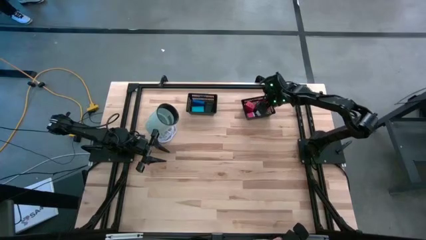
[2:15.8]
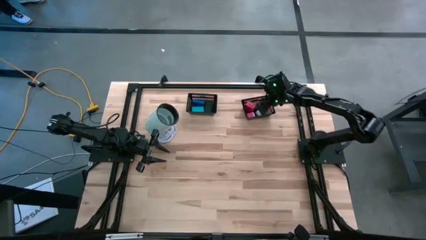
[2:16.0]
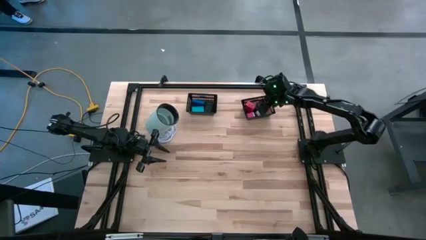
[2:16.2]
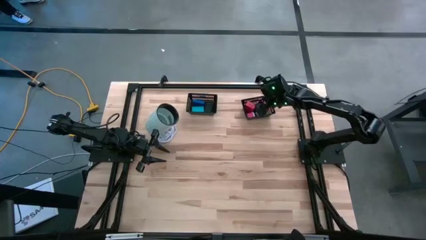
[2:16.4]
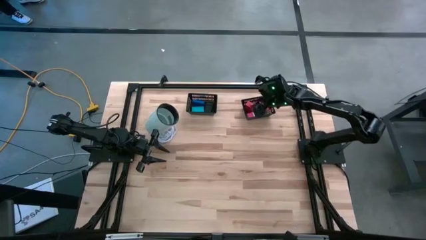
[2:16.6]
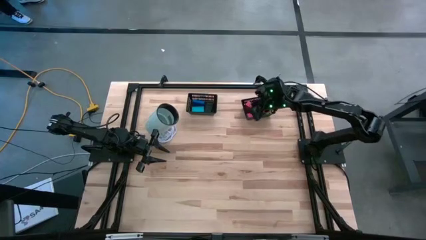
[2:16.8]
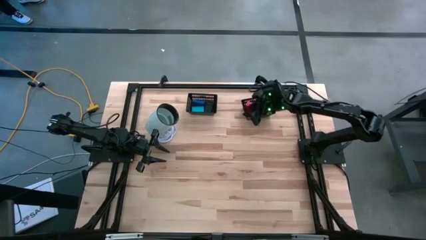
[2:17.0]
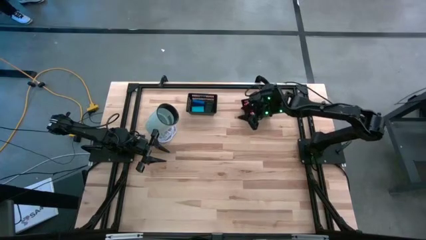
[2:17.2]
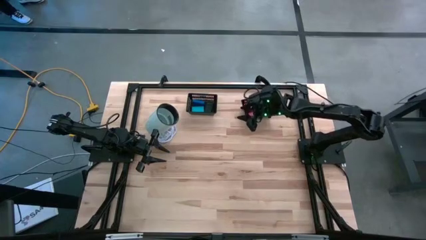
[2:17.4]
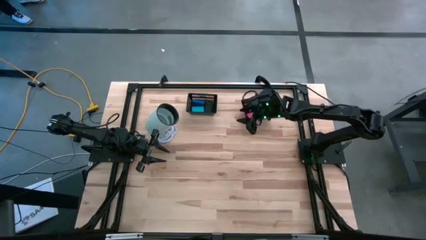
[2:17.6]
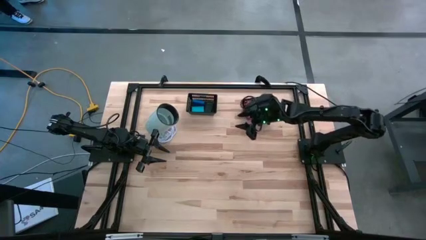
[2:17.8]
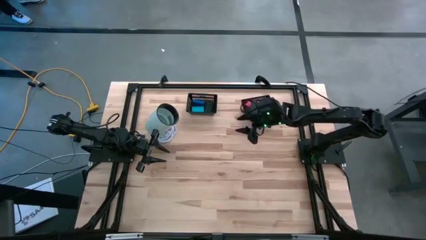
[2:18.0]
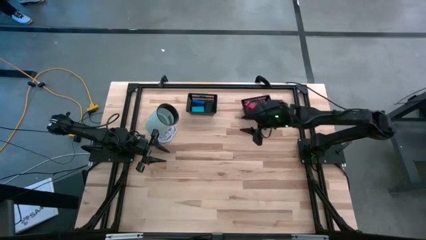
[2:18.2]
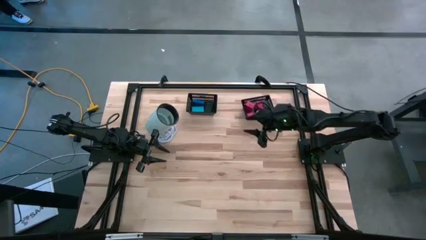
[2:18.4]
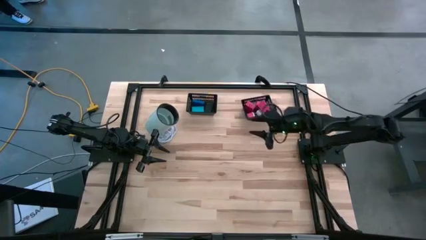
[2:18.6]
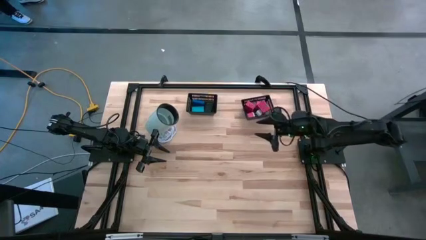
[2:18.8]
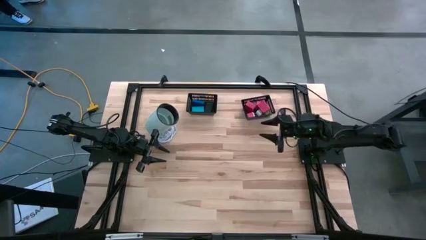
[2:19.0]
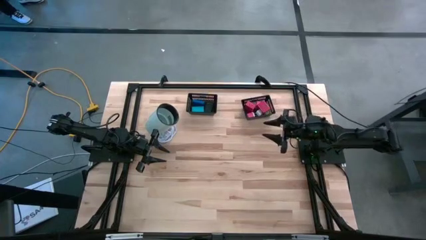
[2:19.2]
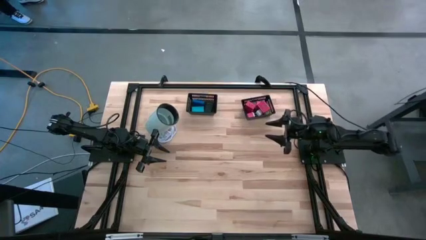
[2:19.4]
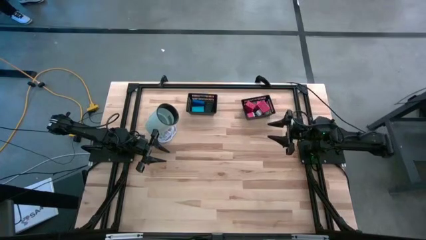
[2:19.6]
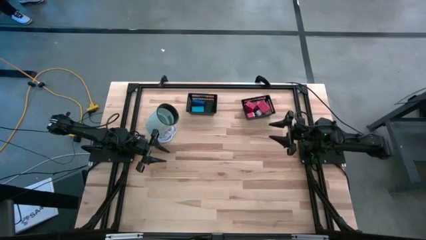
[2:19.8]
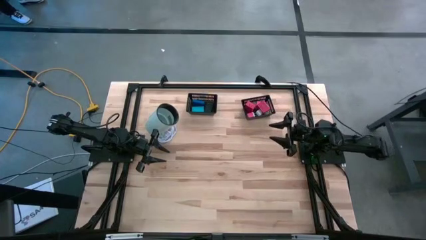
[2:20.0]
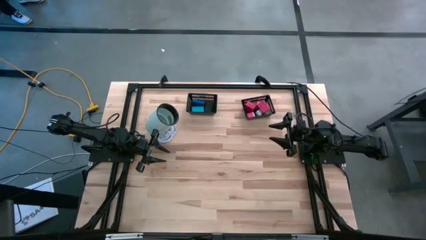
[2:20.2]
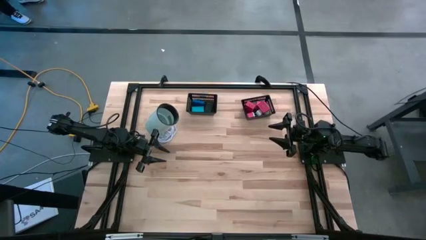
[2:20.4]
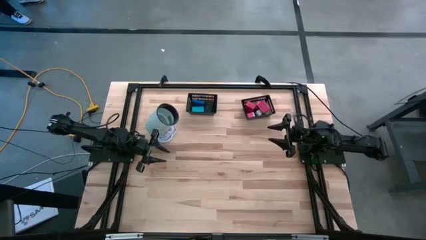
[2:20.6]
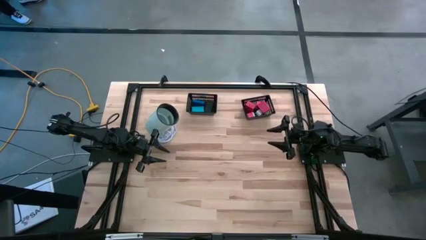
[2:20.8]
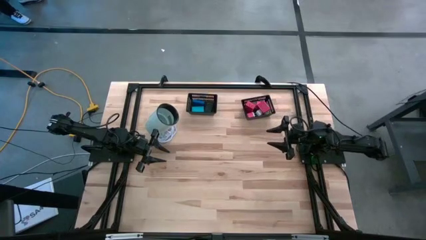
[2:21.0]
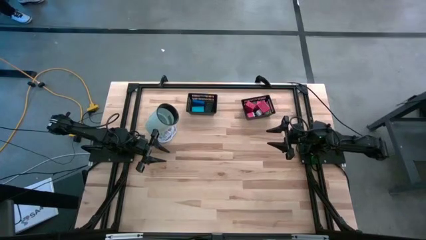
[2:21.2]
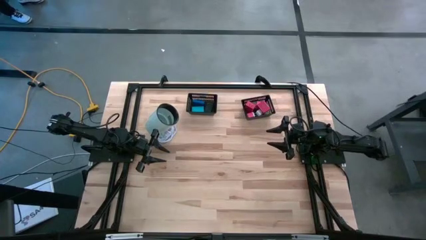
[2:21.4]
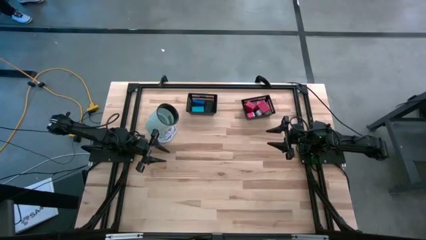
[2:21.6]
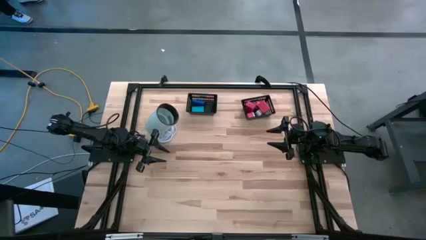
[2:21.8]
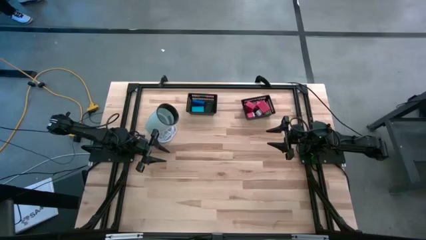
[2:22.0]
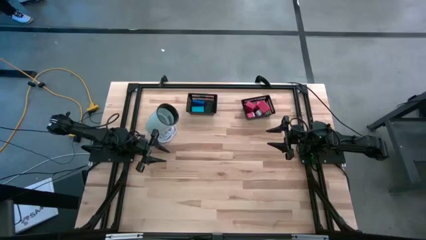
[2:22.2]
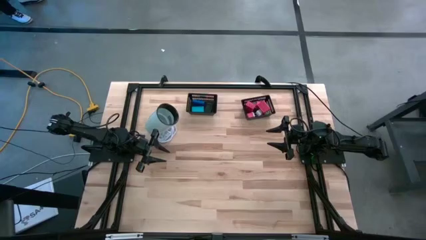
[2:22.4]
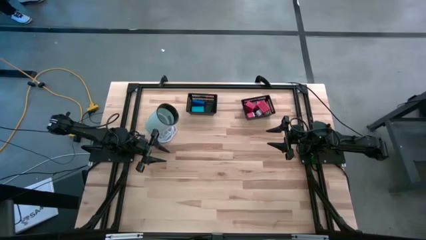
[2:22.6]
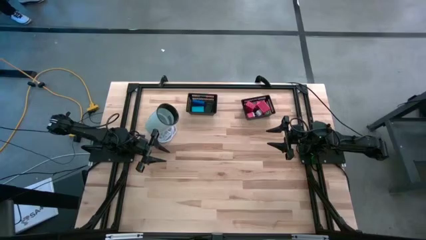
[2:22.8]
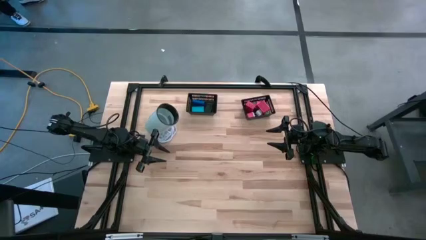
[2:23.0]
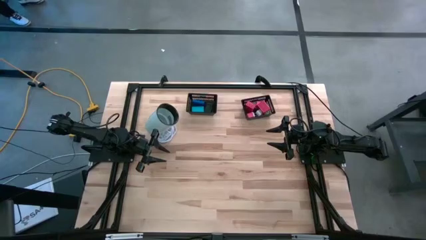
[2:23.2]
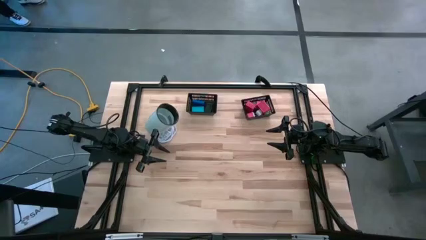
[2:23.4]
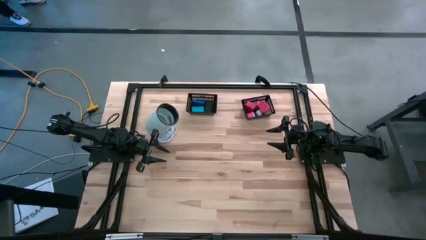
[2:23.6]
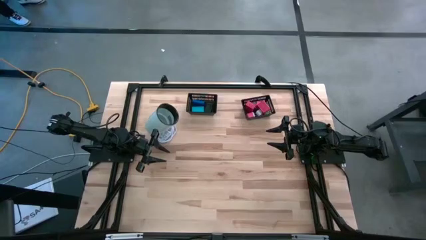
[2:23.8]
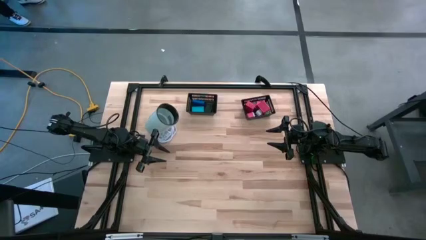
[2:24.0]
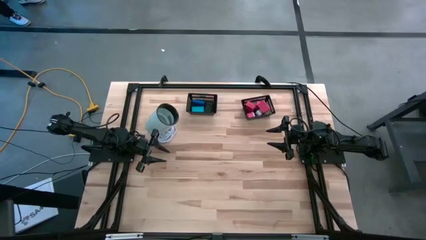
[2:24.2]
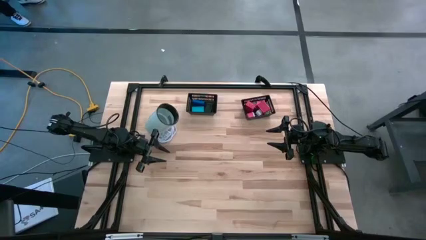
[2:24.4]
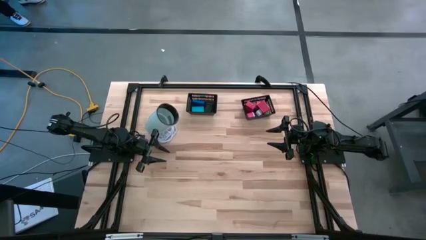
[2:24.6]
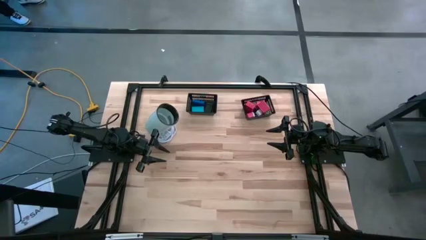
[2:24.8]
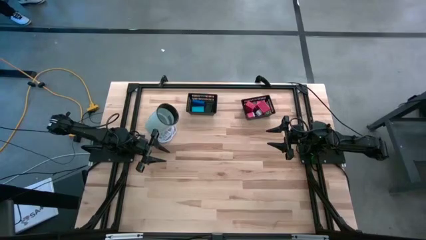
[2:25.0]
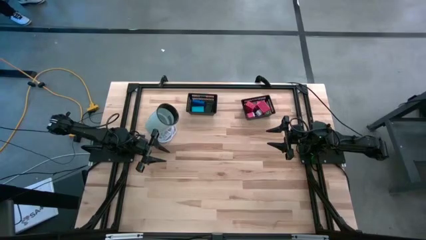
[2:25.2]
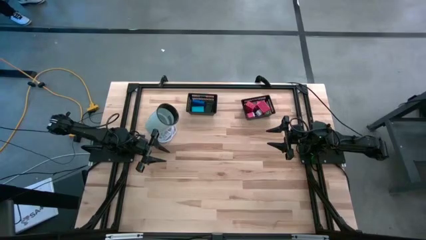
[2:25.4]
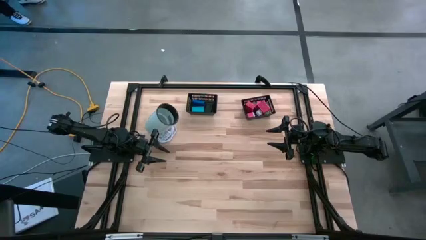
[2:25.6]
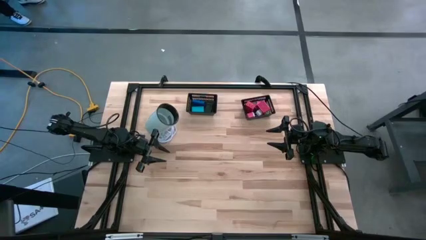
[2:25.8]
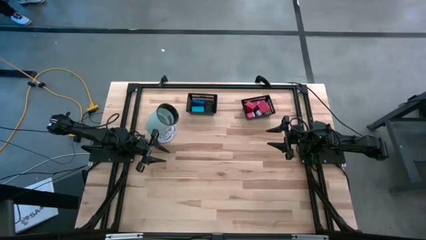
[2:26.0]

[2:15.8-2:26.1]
Task: Pick & Place Office items
Return to Home Position
